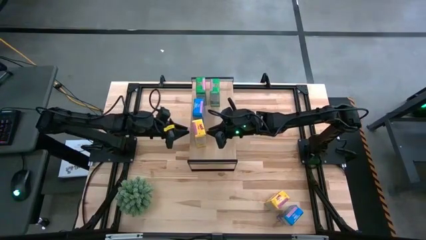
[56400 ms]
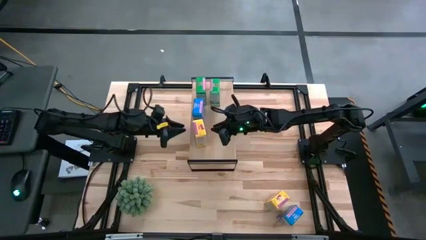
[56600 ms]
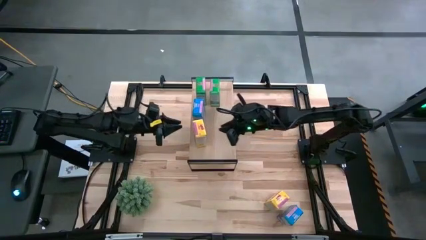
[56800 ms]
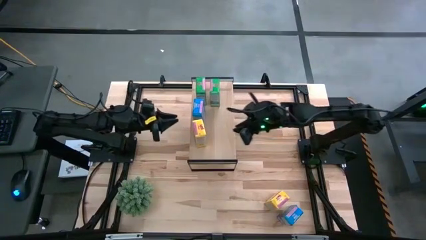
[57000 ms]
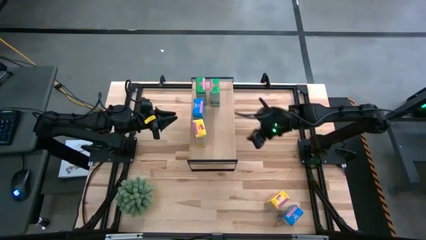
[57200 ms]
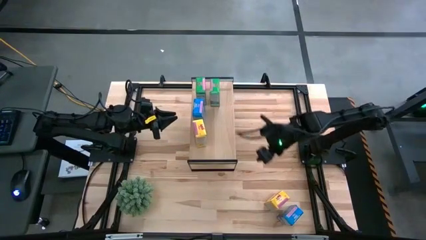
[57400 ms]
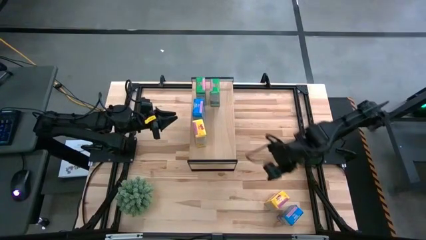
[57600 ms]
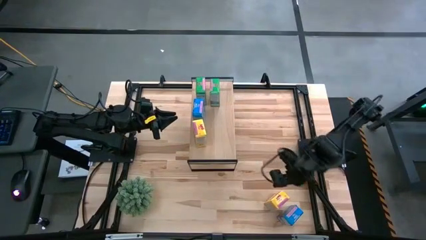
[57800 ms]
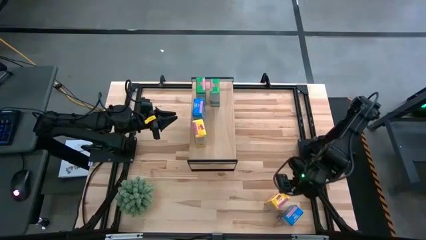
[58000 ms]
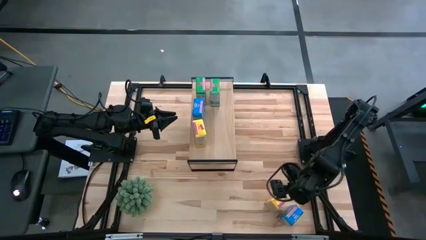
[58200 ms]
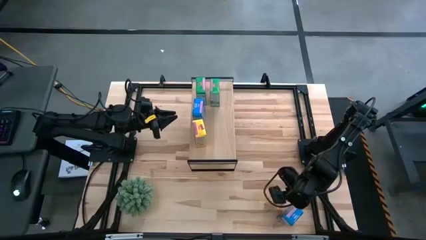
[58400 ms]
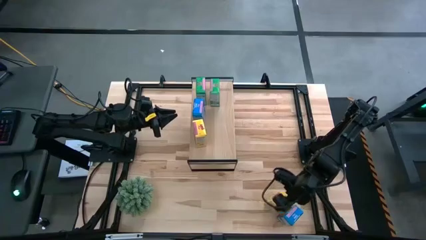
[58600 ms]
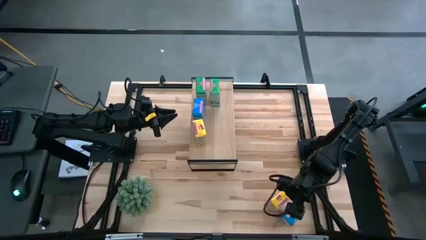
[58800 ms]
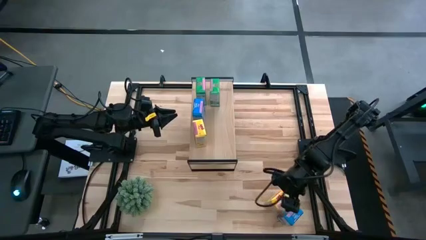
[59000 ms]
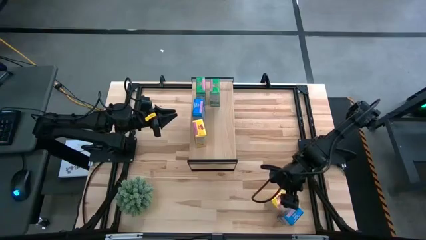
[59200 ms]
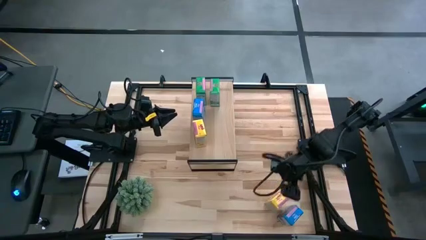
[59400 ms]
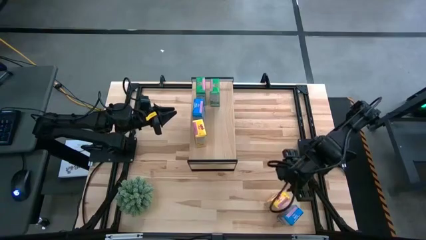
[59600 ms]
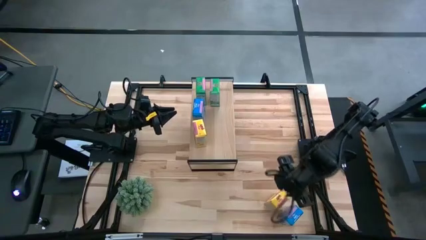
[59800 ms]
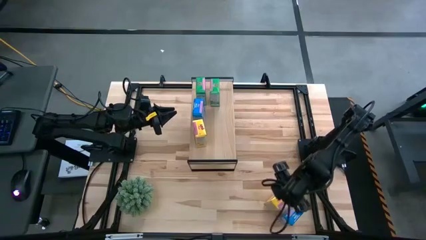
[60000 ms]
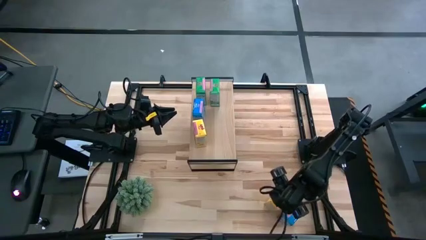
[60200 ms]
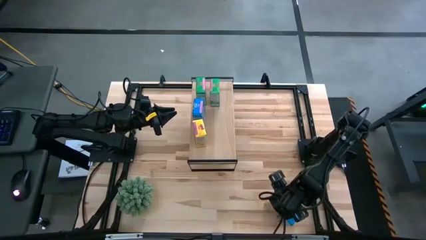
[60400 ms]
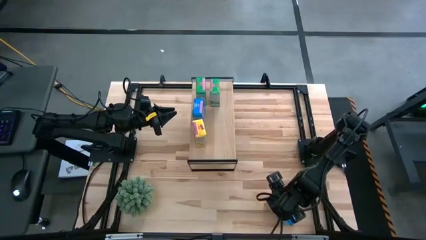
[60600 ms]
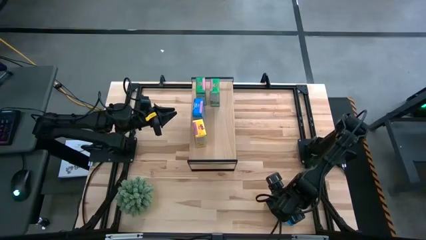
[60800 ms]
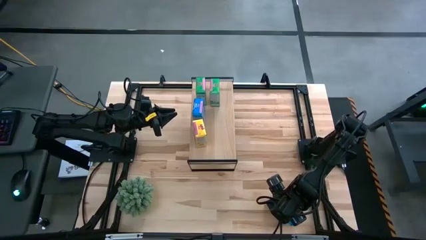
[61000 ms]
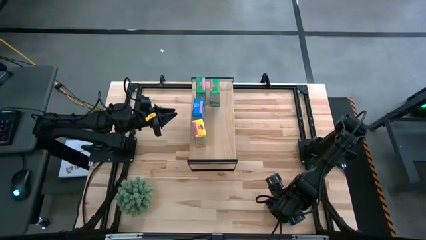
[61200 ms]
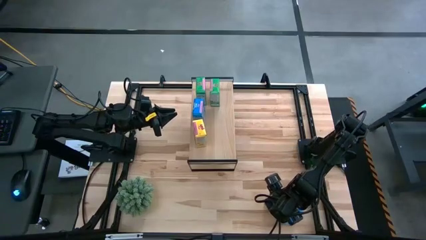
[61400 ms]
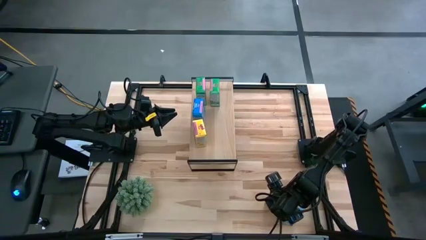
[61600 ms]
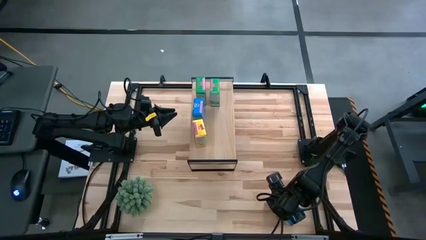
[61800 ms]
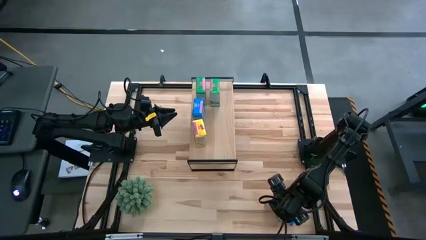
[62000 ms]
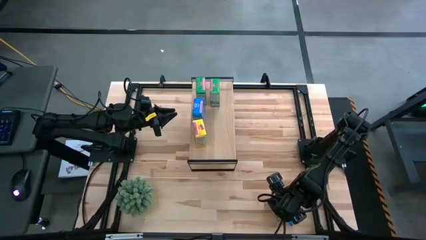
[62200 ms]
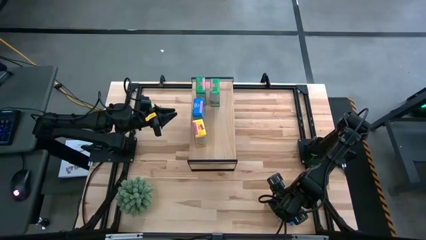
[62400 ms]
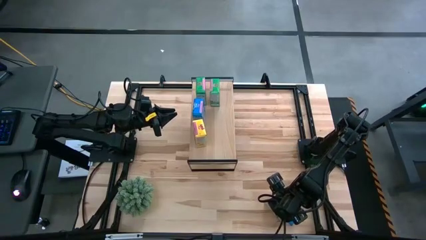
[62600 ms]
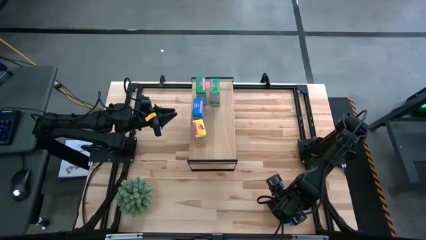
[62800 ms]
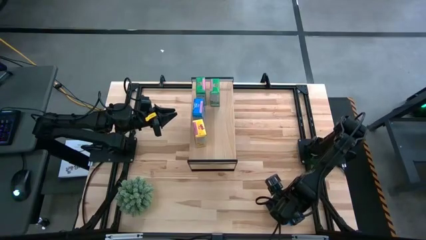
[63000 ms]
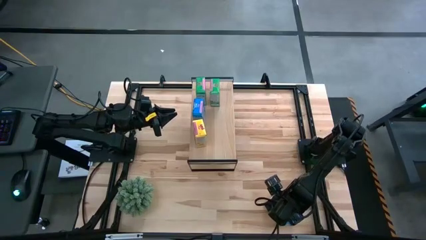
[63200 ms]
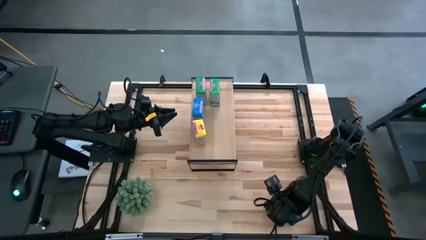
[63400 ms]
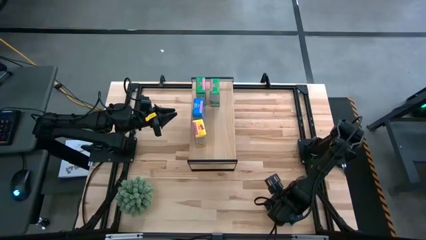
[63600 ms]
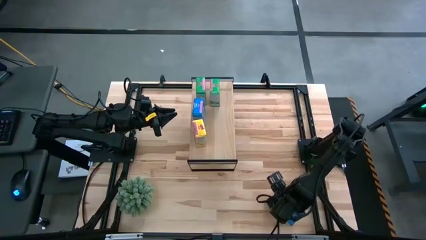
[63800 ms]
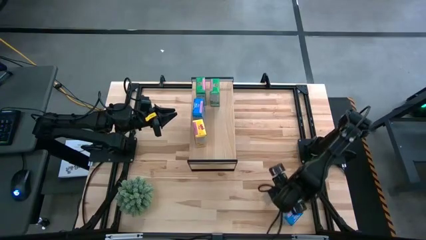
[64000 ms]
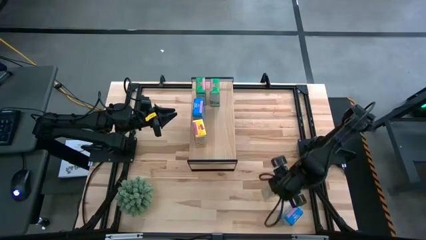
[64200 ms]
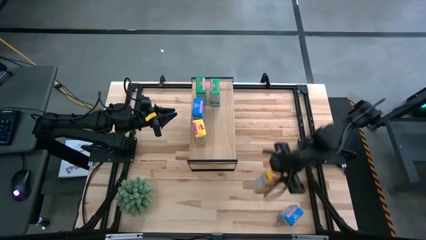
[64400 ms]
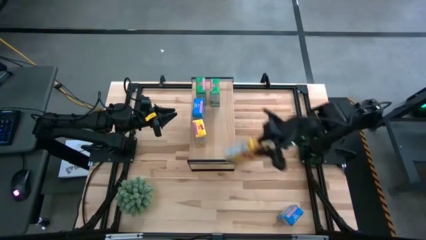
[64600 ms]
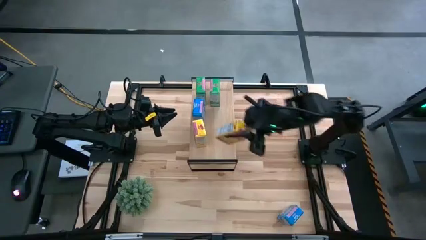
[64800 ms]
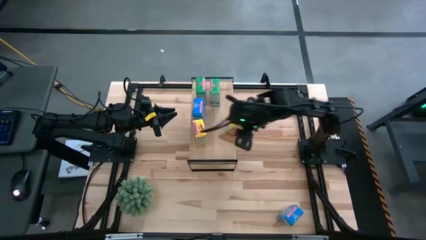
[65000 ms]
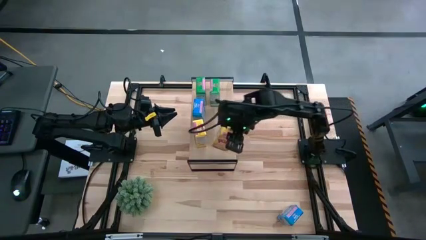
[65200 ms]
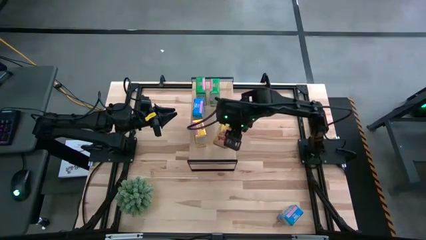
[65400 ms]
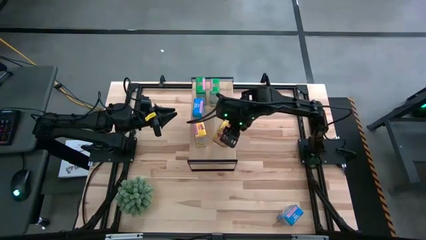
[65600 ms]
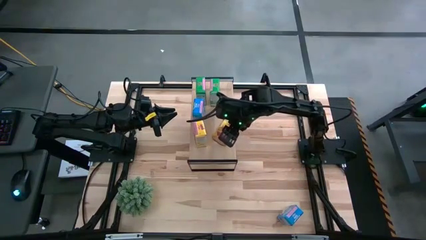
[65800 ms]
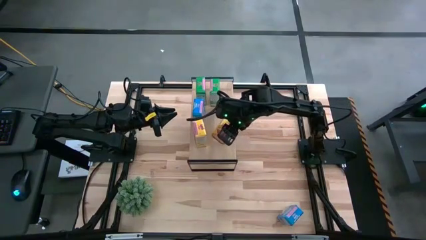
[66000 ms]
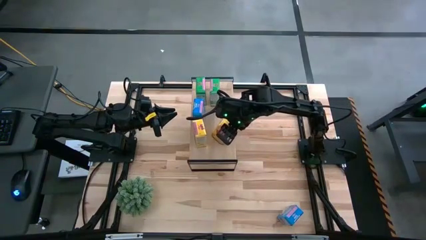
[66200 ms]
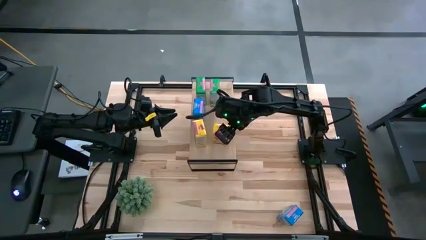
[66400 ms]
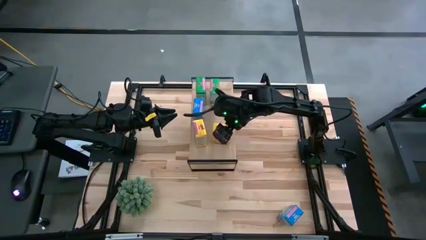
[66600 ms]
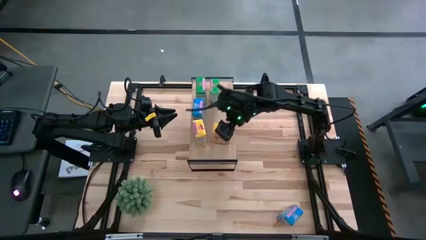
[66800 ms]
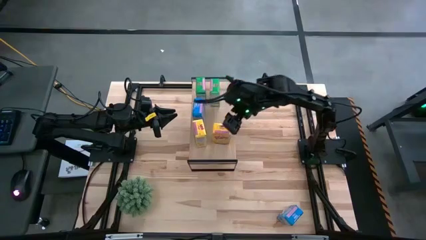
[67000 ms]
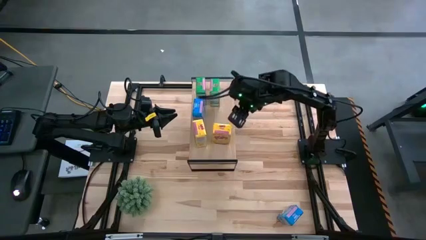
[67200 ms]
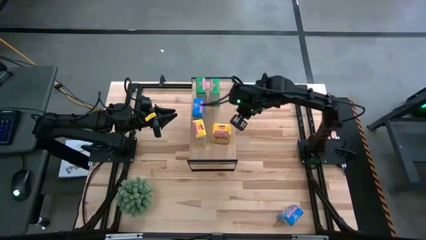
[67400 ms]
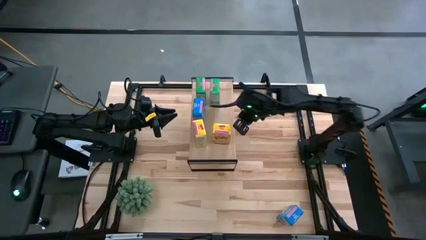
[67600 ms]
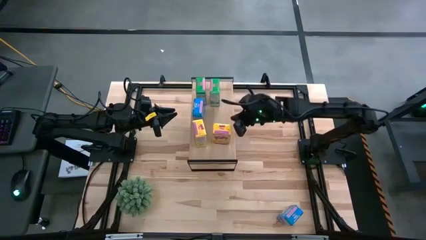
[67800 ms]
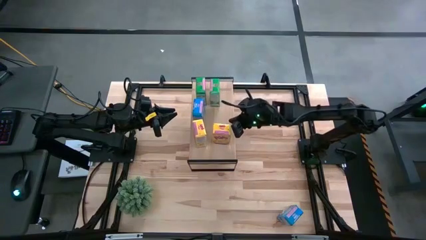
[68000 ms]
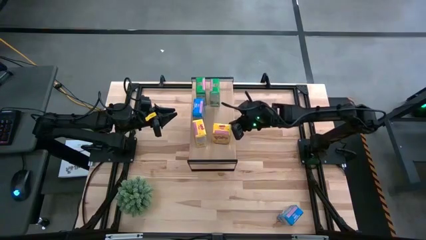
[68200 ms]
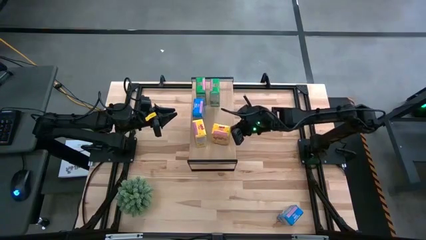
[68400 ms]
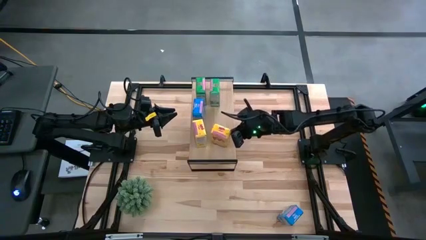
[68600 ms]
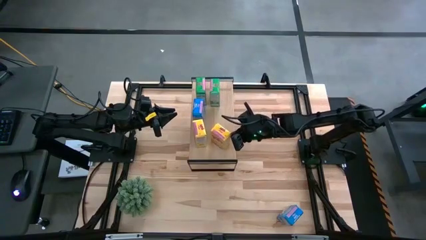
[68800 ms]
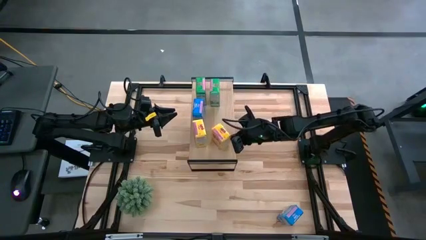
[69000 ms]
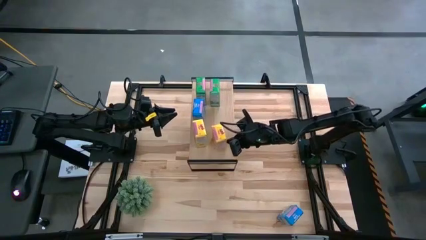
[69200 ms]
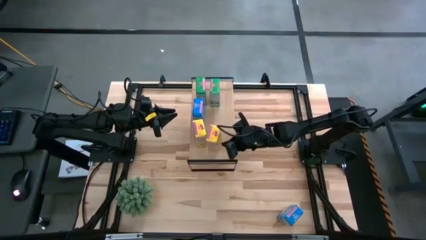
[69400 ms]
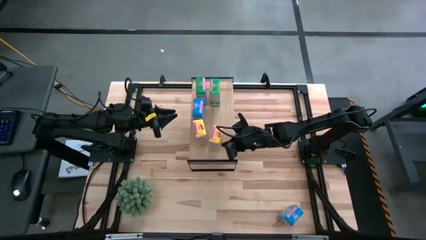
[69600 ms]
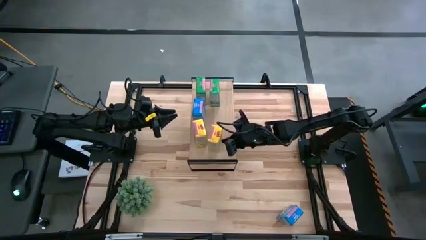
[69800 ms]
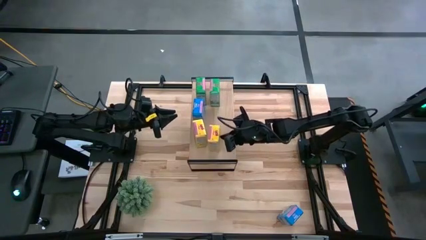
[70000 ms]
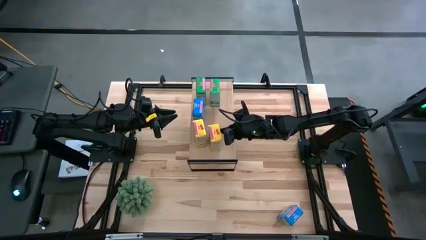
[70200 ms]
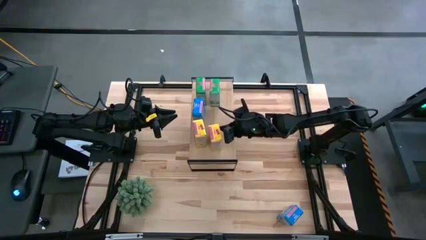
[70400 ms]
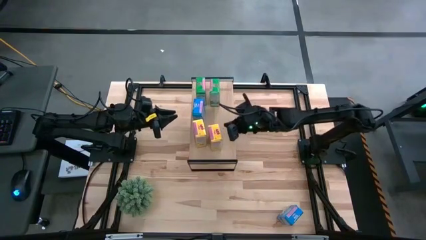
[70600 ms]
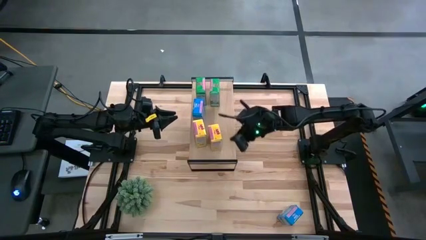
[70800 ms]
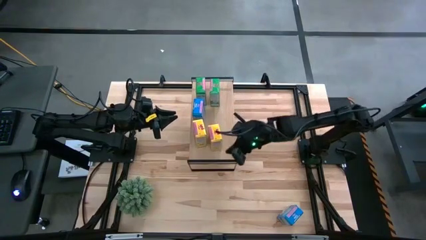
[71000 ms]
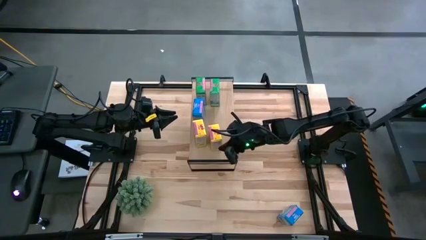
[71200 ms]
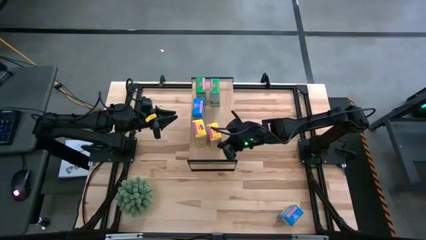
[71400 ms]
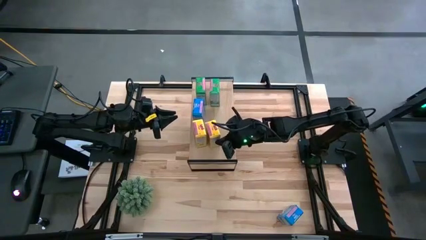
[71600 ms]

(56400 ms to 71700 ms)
Task: Stack cereal on shelf
Put the yellow cereal on the shelf
